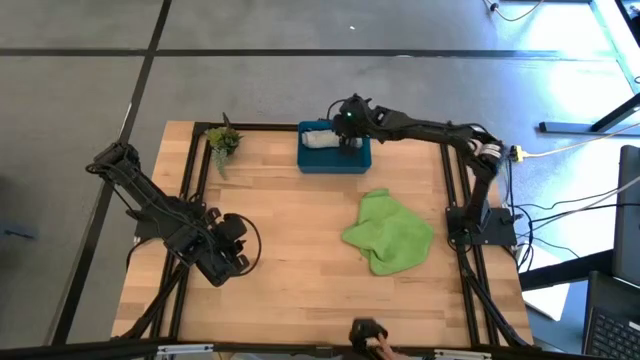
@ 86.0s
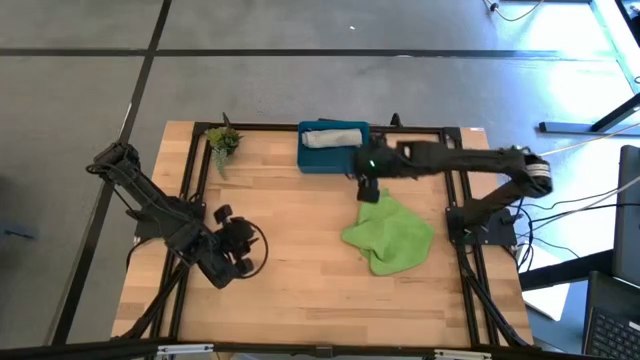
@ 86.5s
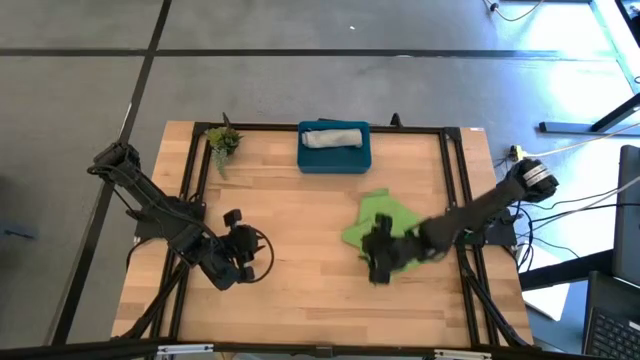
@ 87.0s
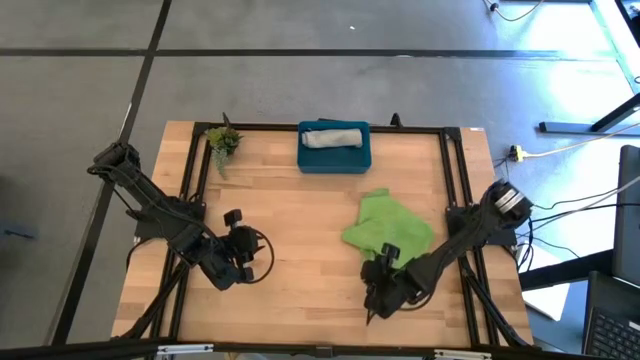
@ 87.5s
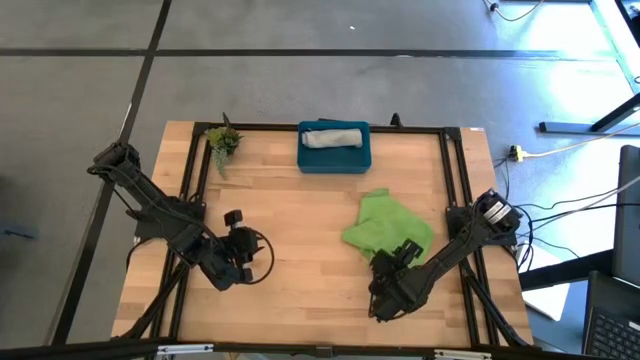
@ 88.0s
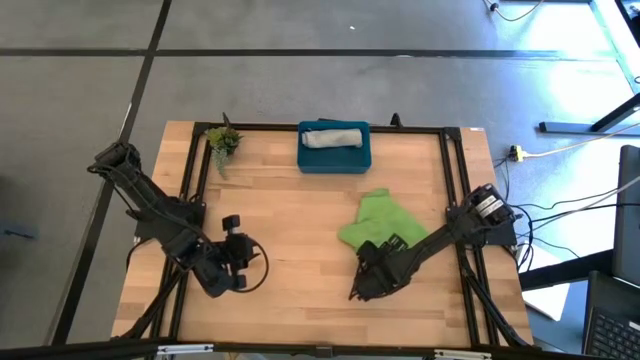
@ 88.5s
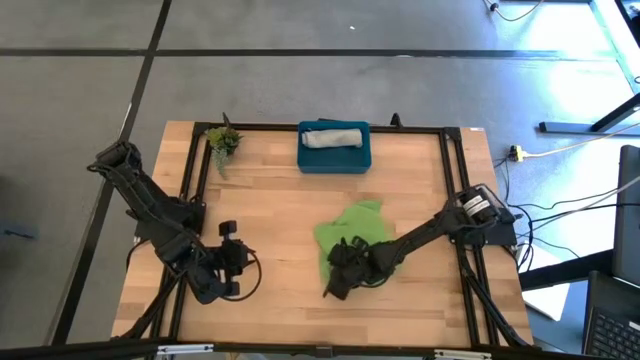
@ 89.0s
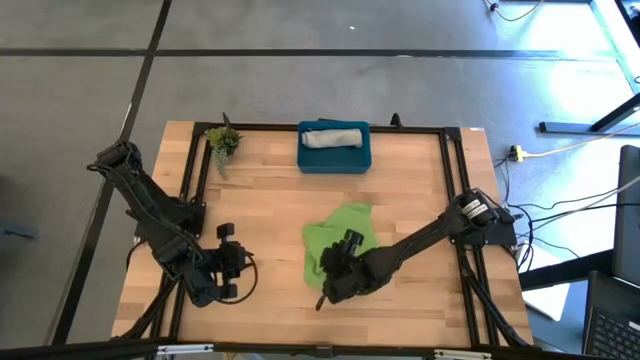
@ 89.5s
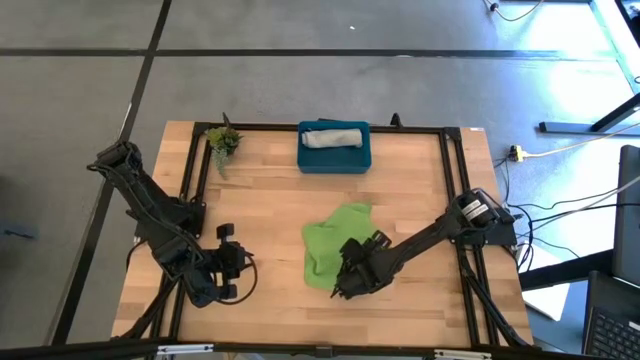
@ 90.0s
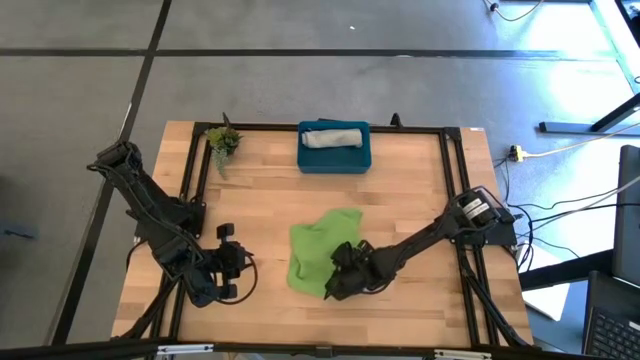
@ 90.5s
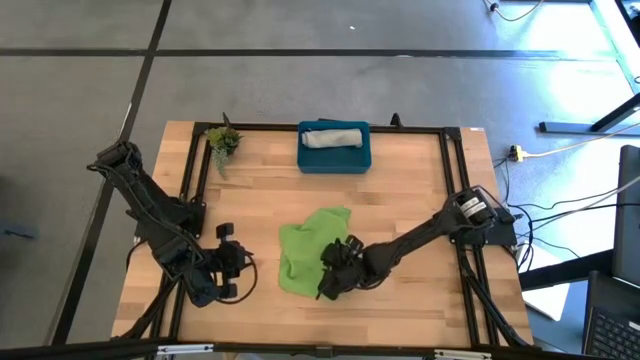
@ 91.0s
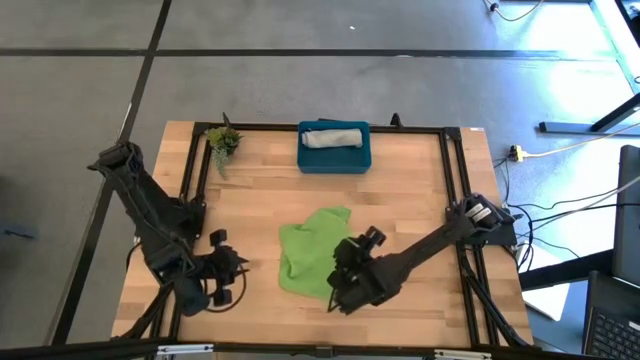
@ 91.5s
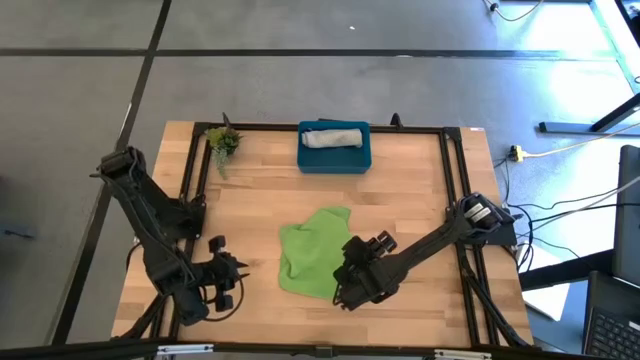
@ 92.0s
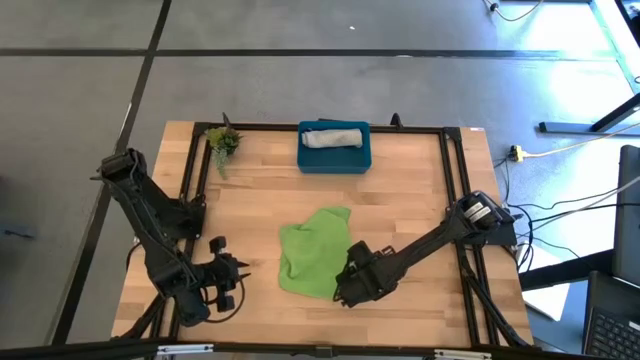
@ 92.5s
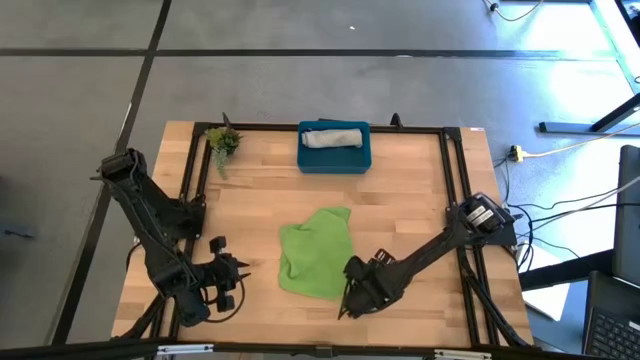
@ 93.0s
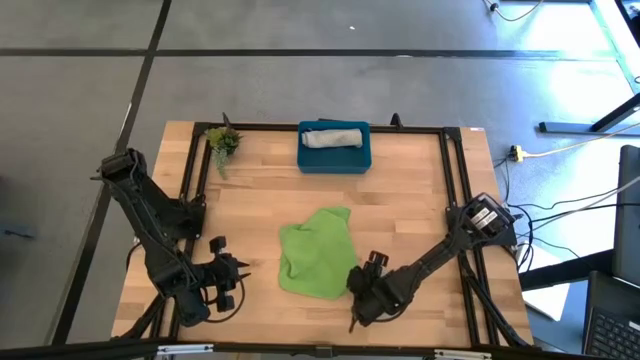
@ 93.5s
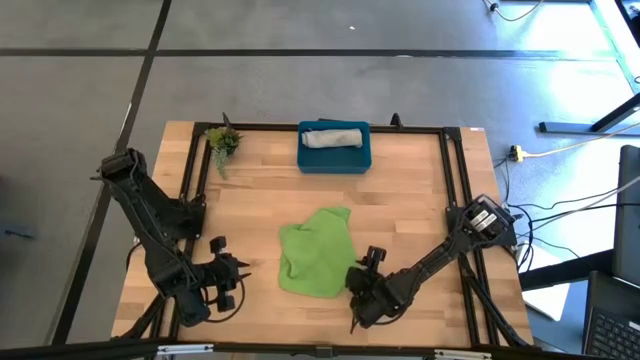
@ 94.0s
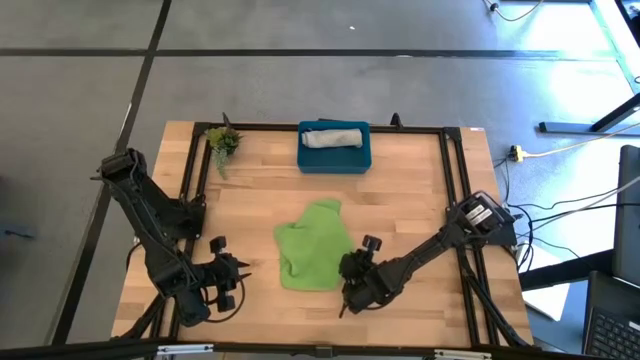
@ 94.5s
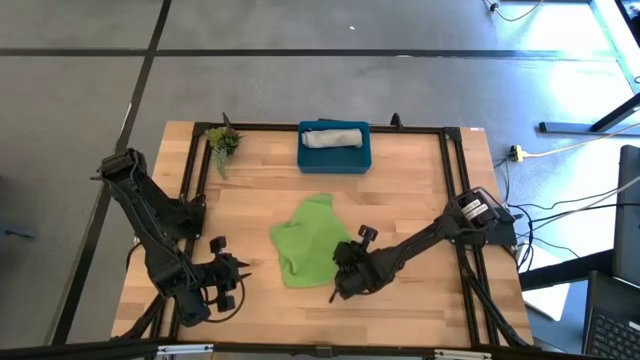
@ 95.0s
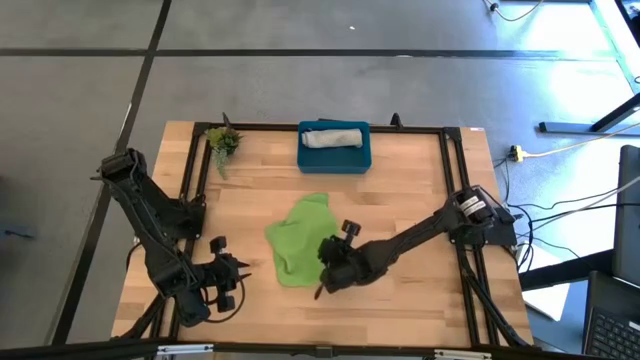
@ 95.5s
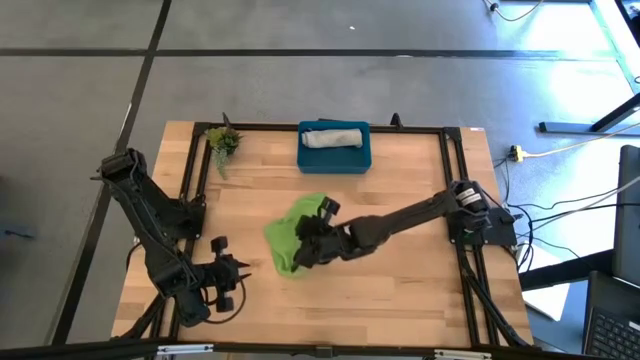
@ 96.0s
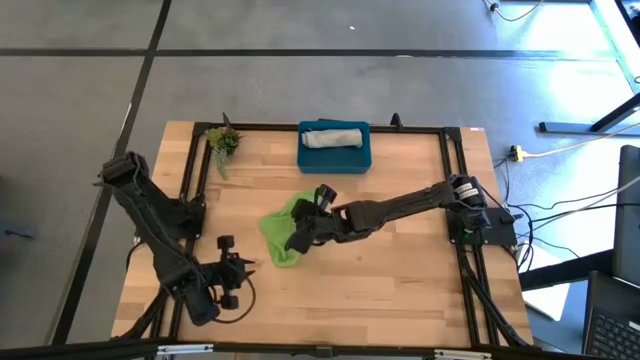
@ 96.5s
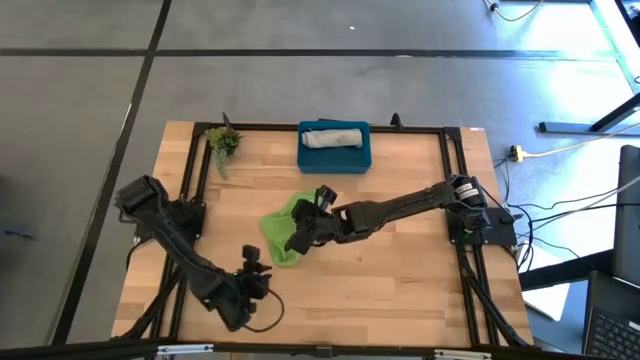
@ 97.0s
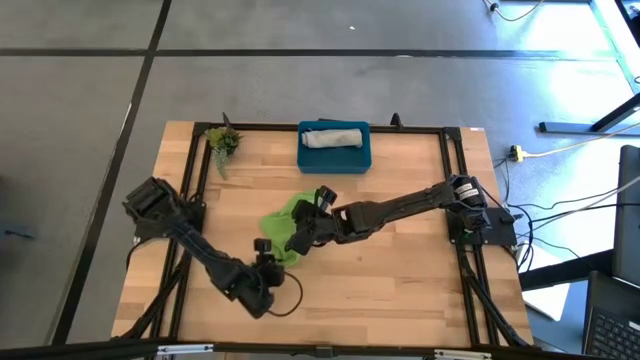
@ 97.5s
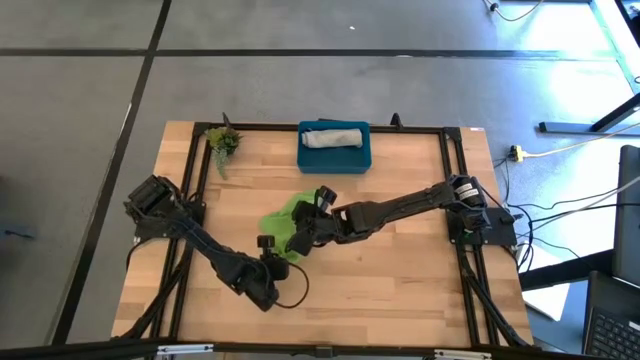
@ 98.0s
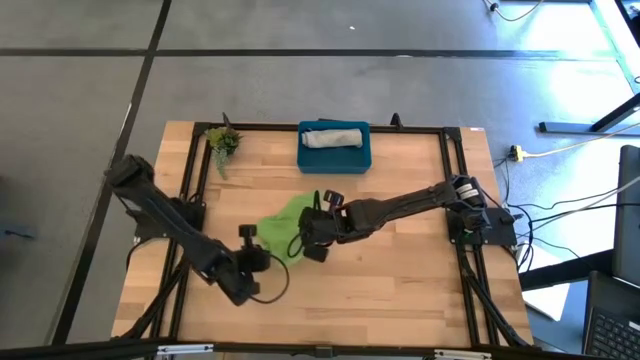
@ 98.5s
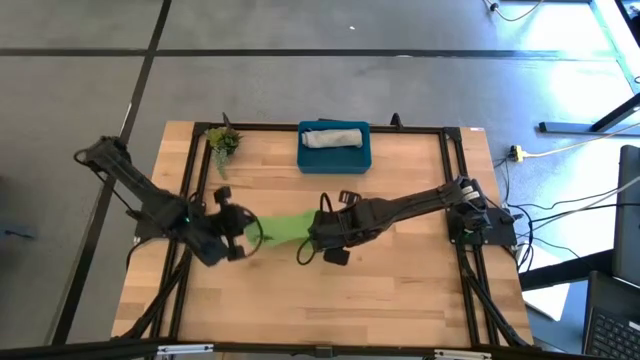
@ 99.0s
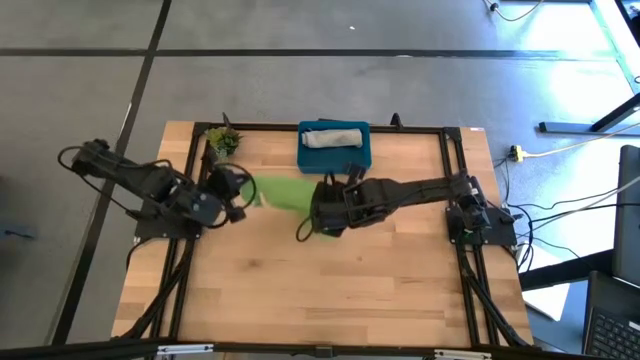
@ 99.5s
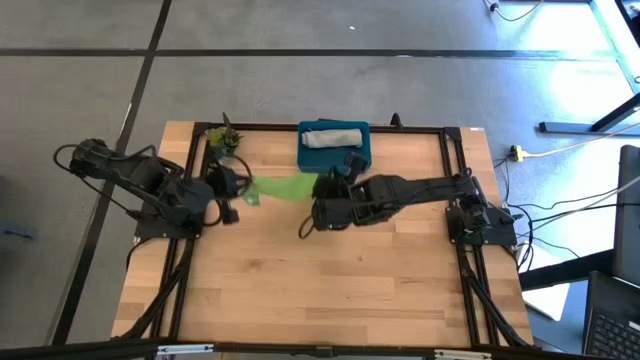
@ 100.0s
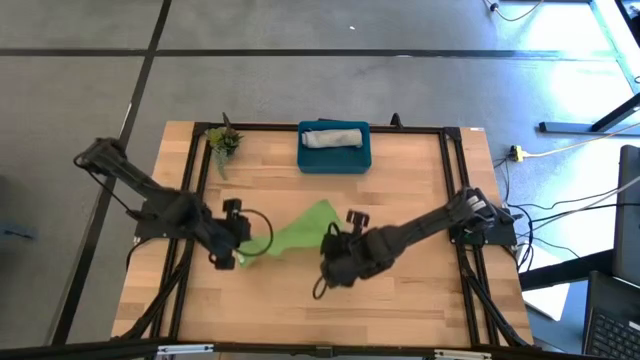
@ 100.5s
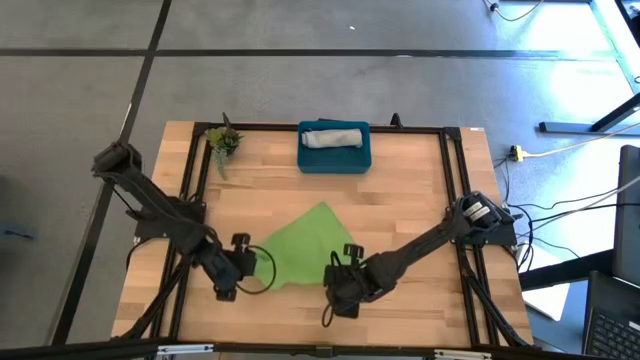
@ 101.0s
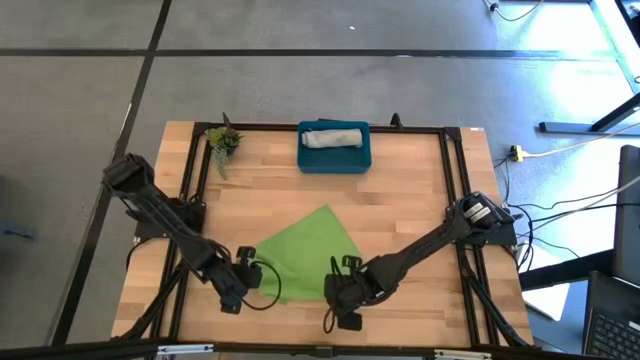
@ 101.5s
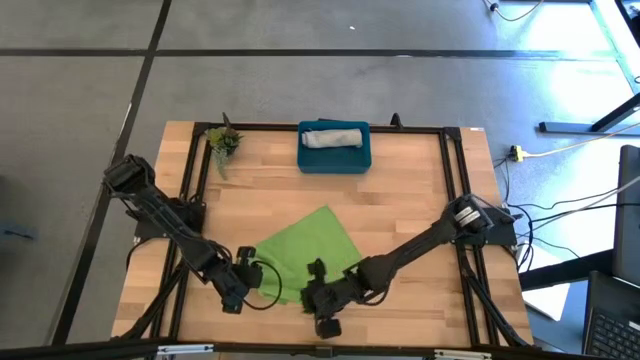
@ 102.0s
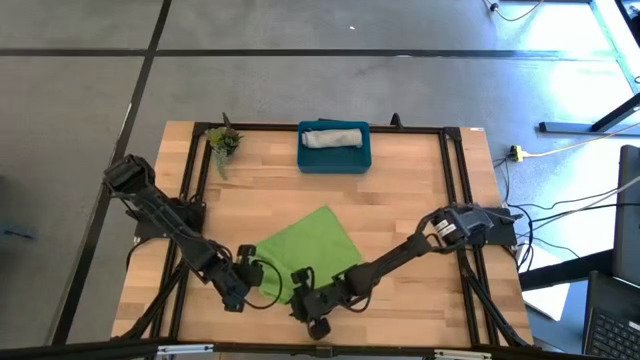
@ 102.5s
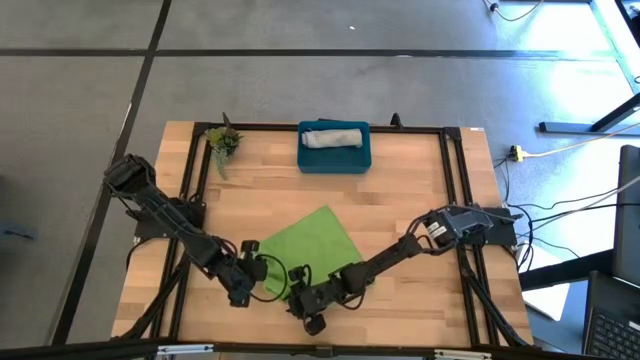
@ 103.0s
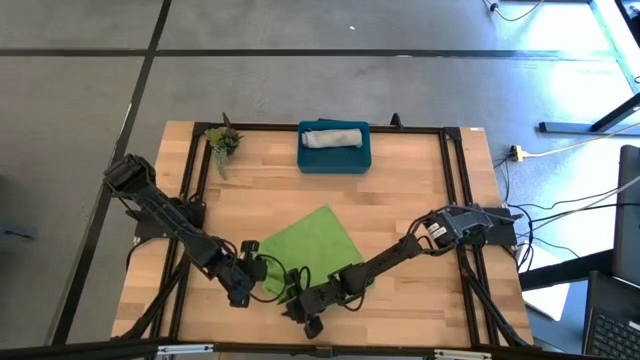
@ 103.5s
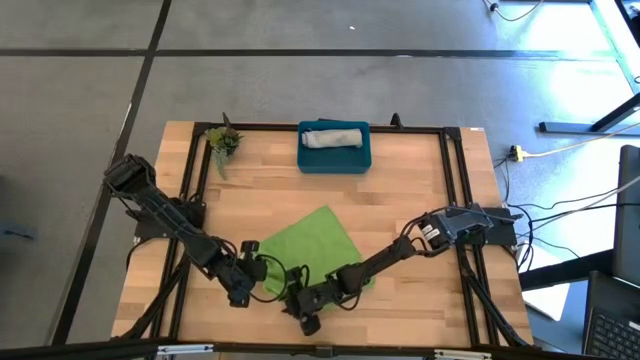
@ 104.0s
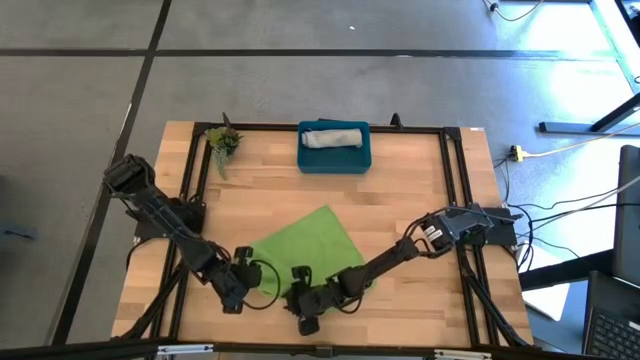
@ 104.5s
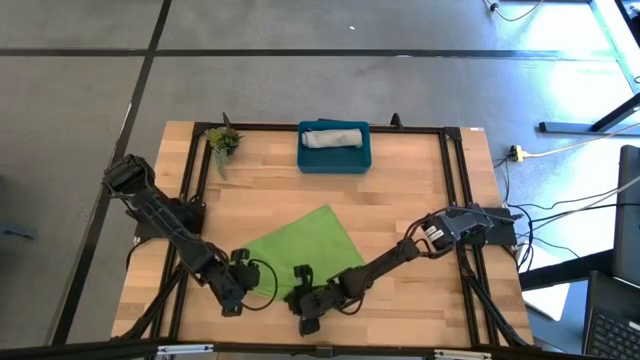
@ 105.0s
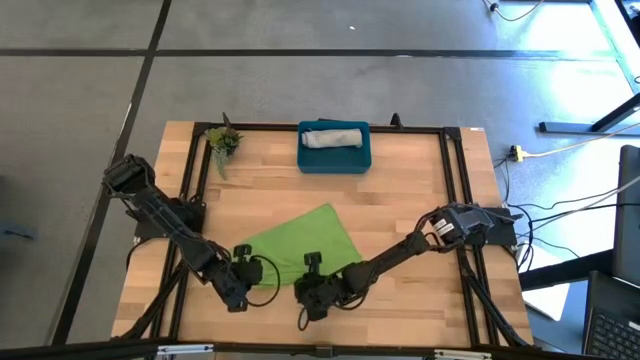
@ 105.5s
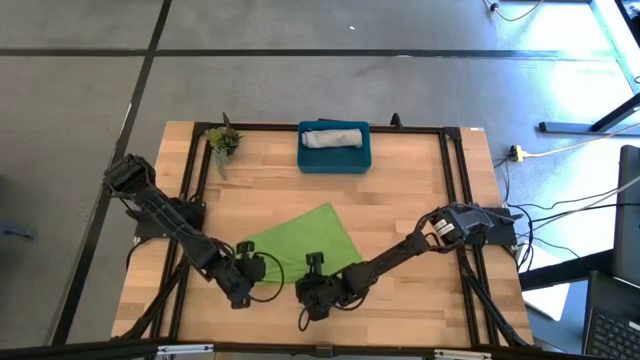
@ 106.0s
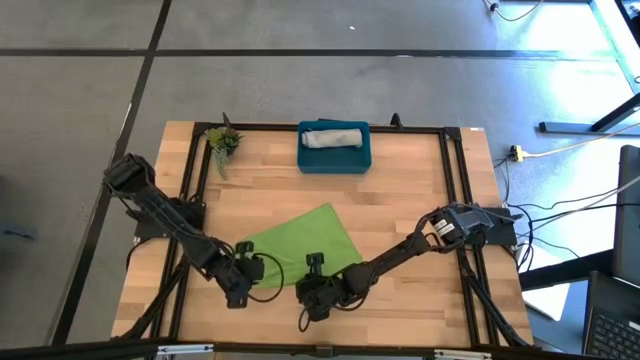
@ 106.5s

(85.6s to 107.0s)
Task: Roll microfiber towels into tight, uniform cylinder then place into a basket
Roll the green microfiber cloth

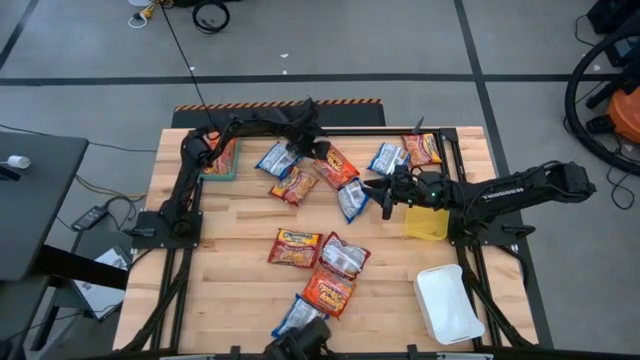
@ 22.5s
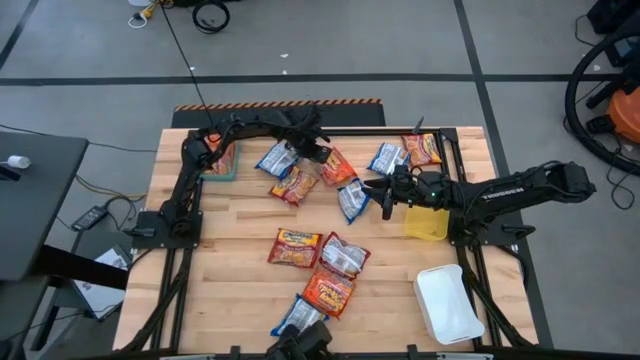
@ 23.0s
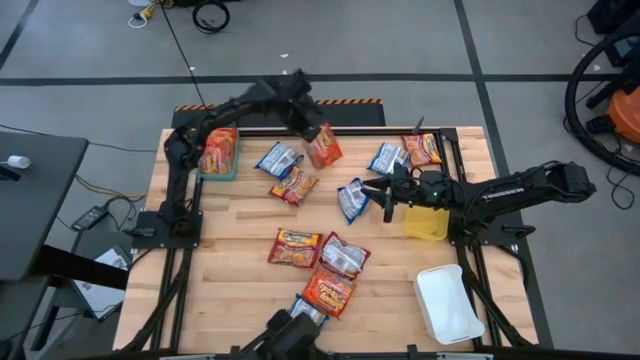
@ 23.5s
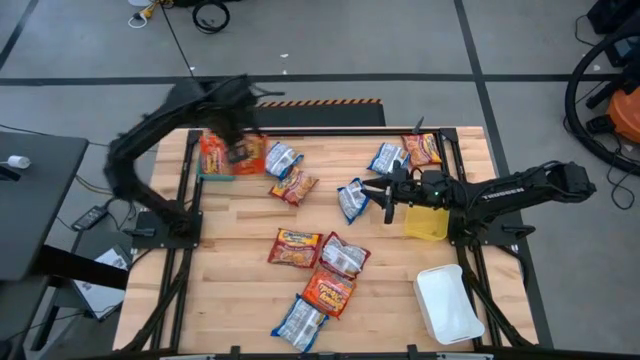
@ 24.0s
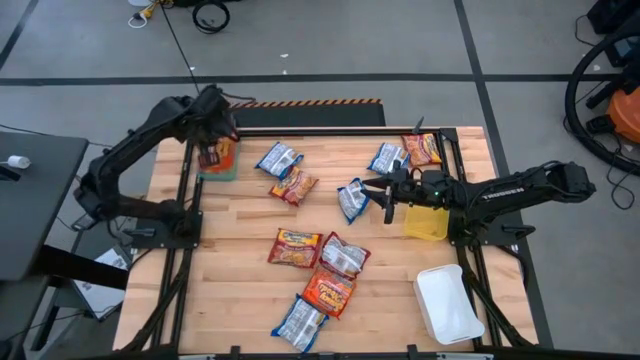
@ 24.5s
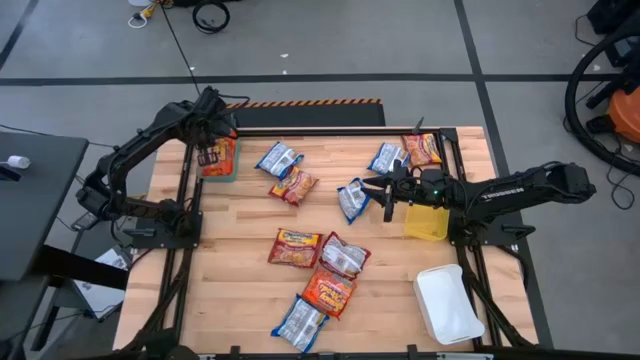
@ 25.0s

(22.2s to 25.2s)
Task: Sort Maruchan noodles
Put the orange noodle pack into the green bin
